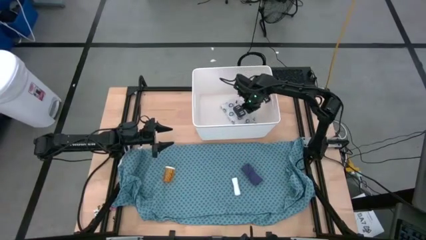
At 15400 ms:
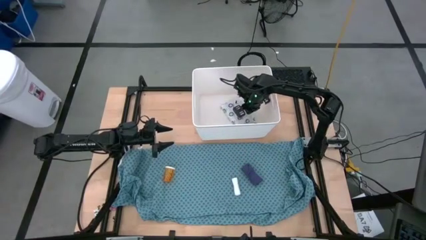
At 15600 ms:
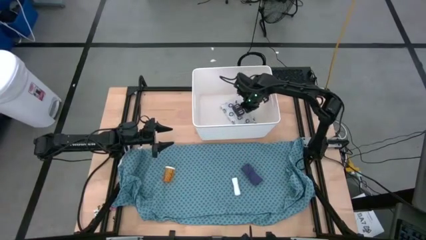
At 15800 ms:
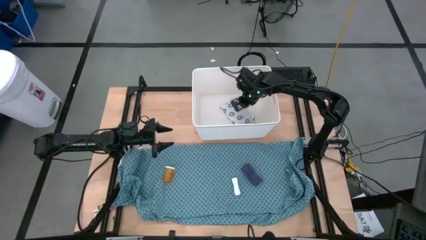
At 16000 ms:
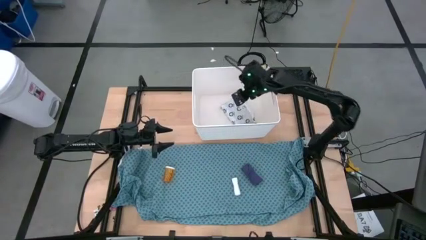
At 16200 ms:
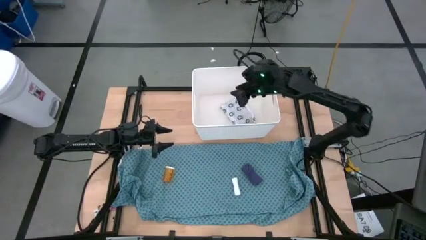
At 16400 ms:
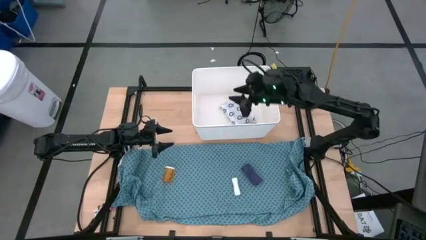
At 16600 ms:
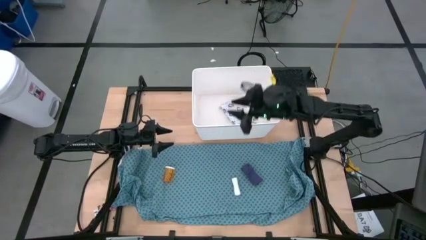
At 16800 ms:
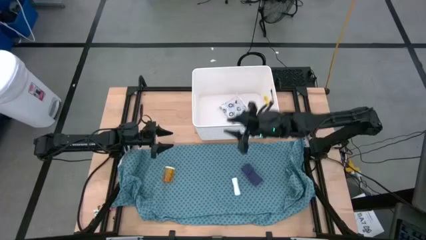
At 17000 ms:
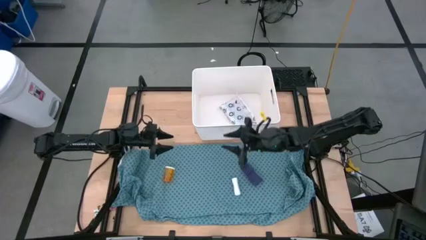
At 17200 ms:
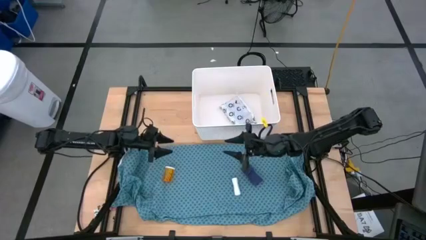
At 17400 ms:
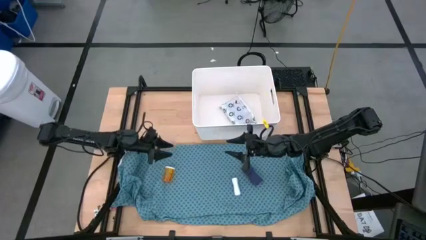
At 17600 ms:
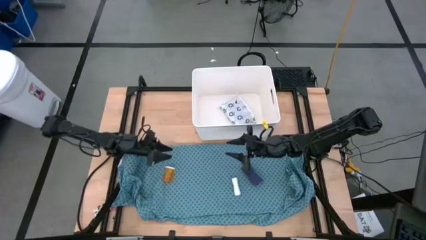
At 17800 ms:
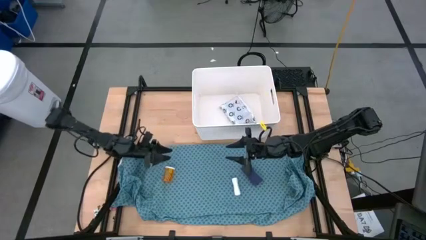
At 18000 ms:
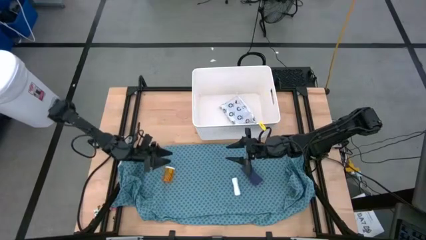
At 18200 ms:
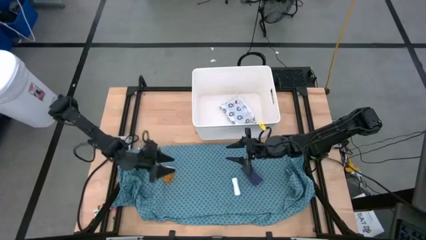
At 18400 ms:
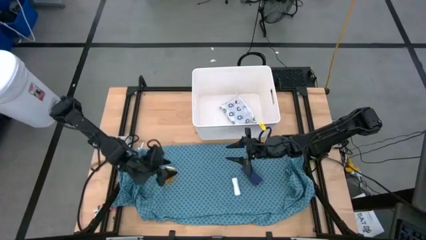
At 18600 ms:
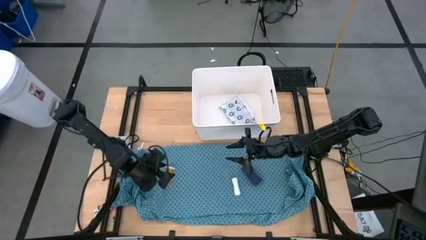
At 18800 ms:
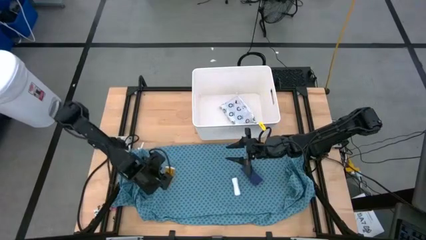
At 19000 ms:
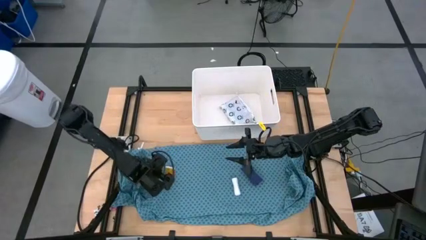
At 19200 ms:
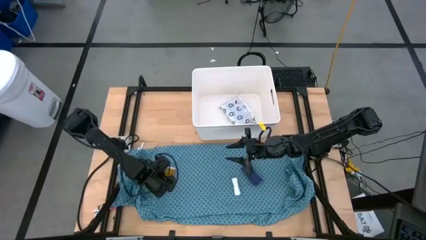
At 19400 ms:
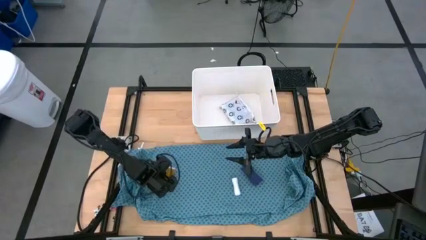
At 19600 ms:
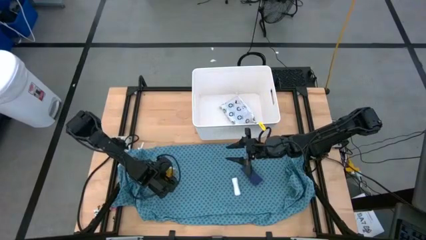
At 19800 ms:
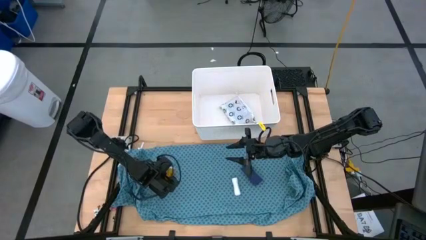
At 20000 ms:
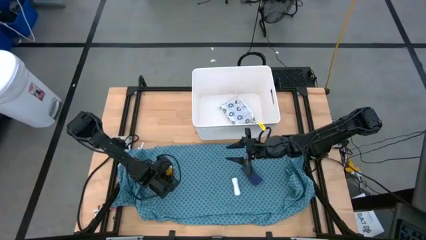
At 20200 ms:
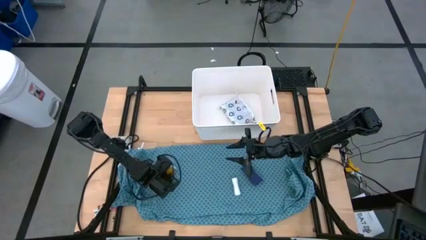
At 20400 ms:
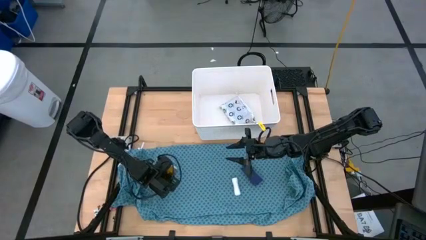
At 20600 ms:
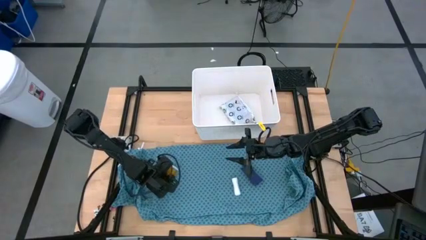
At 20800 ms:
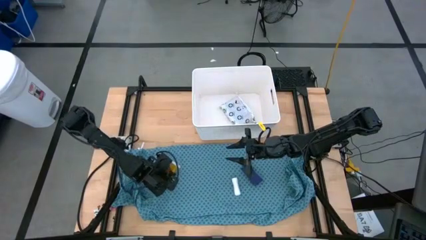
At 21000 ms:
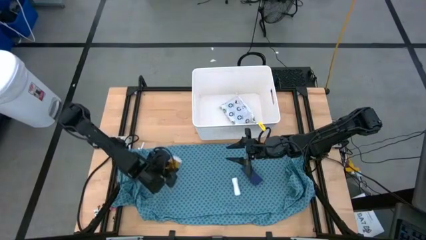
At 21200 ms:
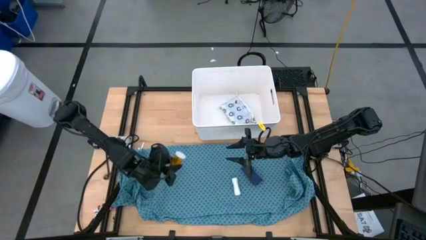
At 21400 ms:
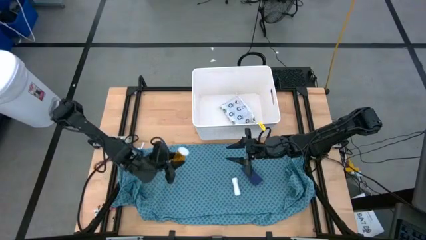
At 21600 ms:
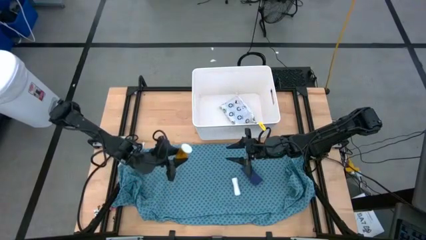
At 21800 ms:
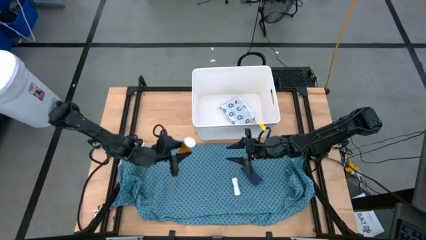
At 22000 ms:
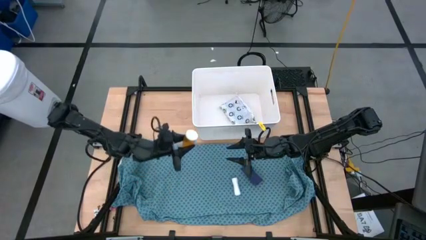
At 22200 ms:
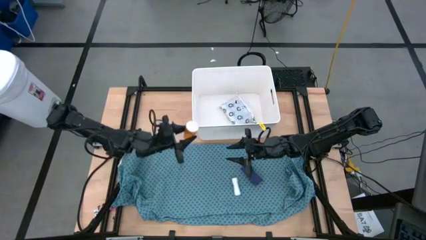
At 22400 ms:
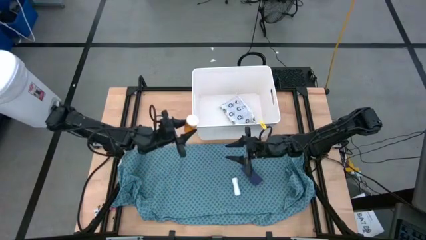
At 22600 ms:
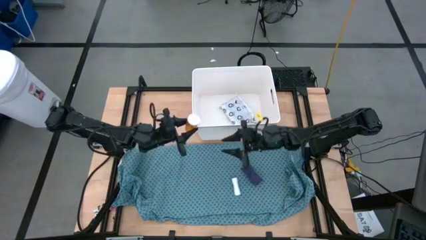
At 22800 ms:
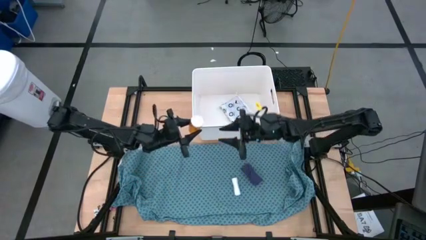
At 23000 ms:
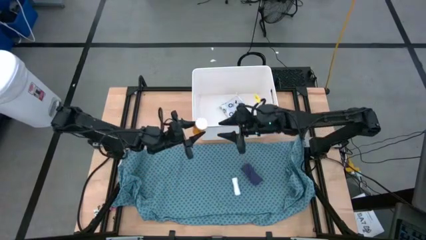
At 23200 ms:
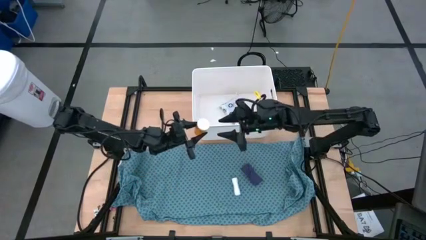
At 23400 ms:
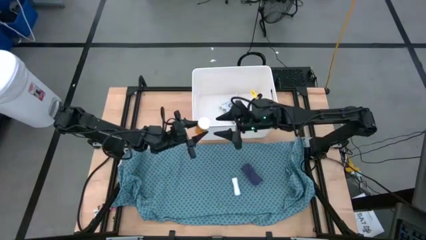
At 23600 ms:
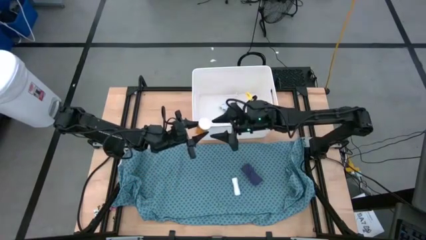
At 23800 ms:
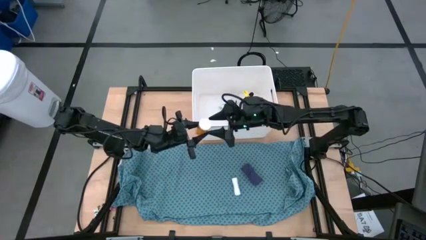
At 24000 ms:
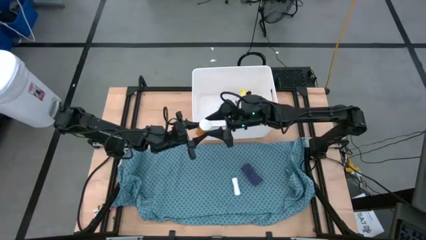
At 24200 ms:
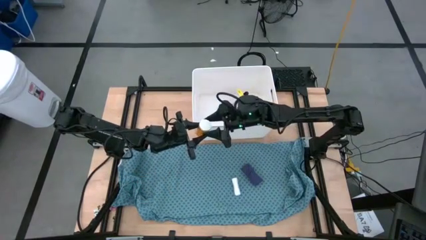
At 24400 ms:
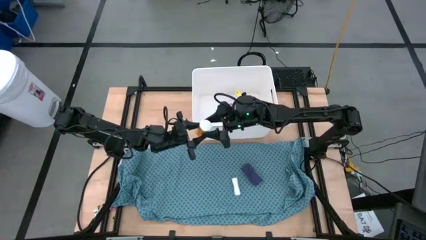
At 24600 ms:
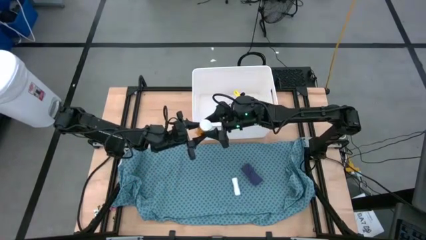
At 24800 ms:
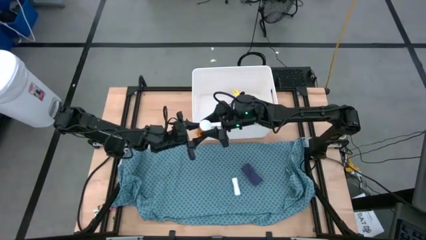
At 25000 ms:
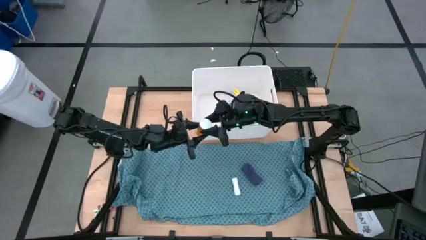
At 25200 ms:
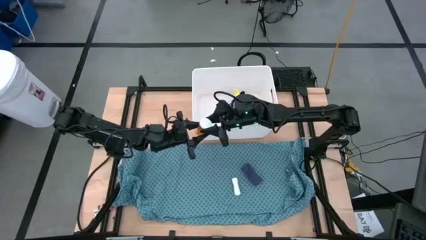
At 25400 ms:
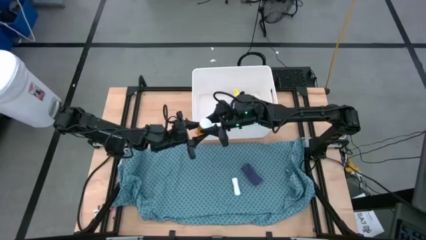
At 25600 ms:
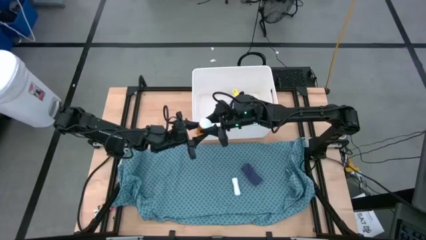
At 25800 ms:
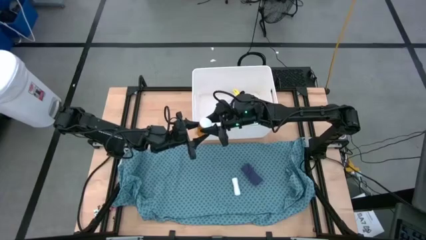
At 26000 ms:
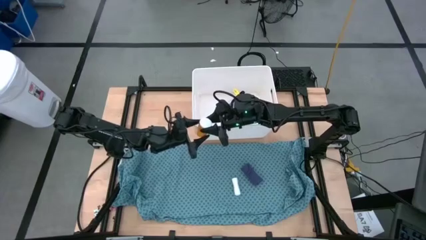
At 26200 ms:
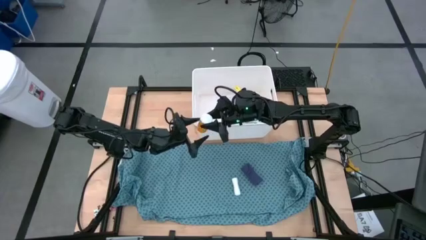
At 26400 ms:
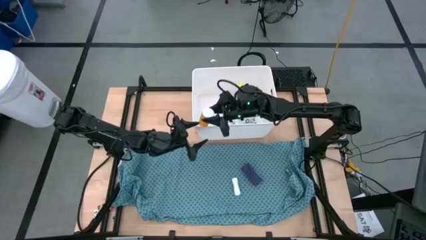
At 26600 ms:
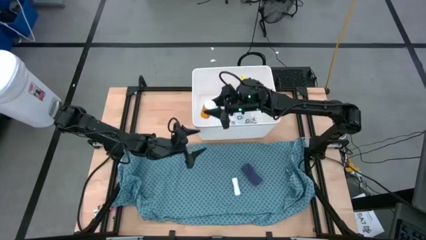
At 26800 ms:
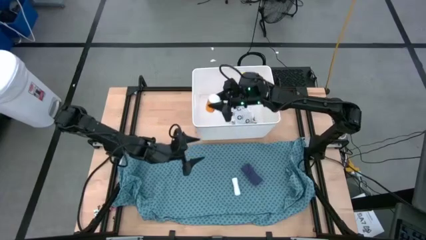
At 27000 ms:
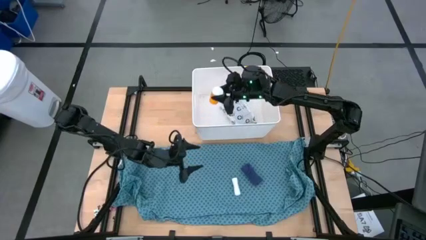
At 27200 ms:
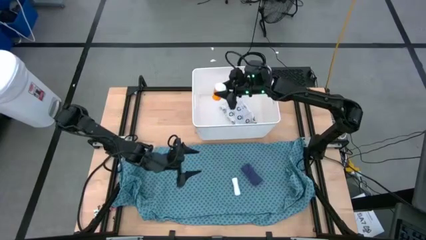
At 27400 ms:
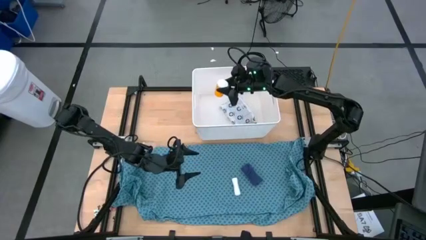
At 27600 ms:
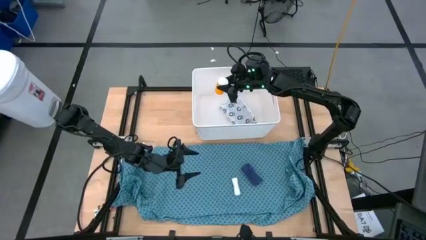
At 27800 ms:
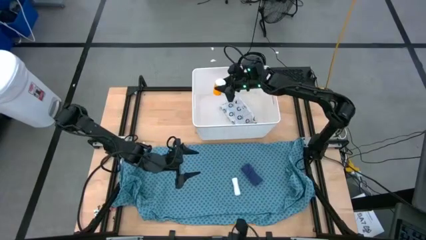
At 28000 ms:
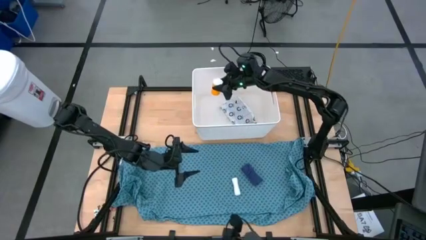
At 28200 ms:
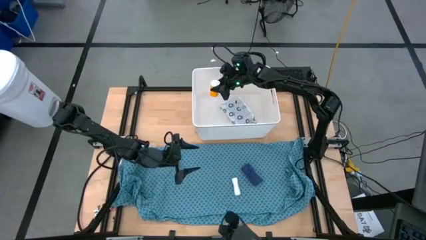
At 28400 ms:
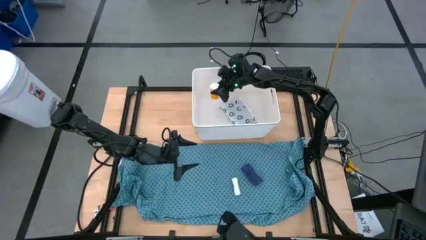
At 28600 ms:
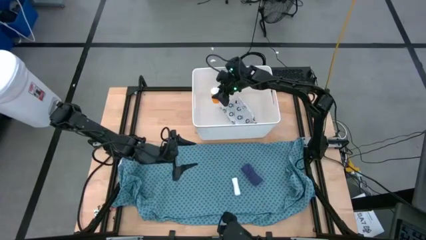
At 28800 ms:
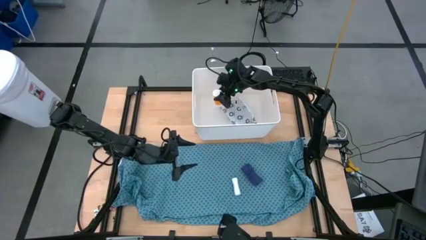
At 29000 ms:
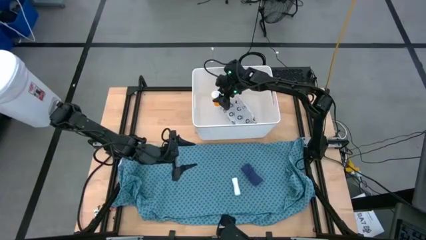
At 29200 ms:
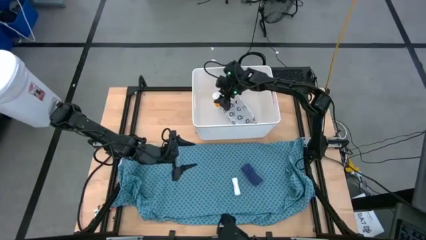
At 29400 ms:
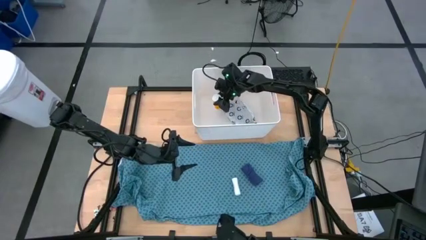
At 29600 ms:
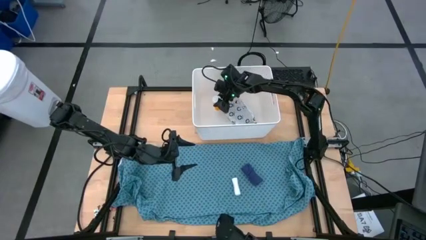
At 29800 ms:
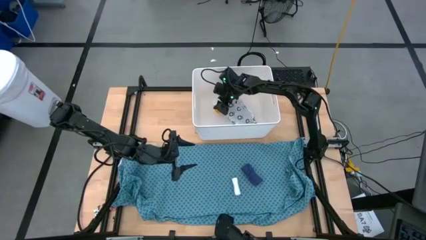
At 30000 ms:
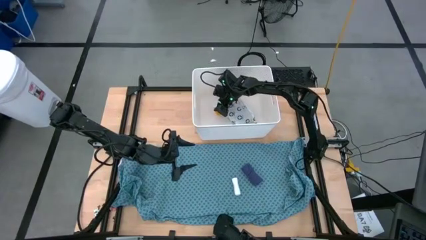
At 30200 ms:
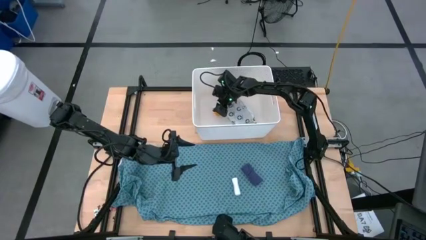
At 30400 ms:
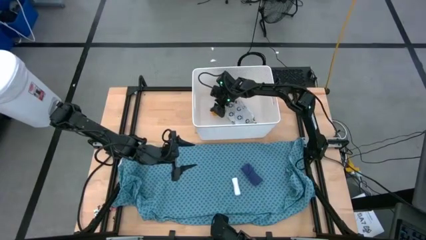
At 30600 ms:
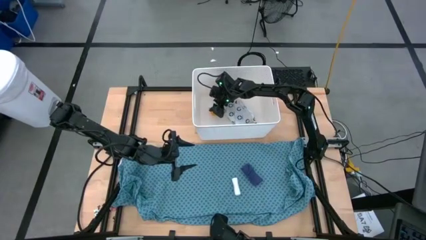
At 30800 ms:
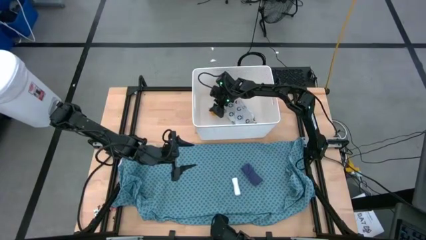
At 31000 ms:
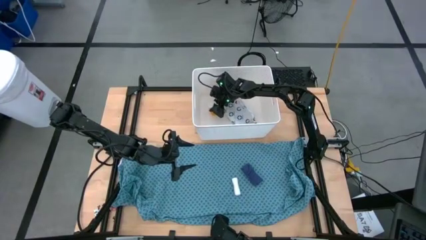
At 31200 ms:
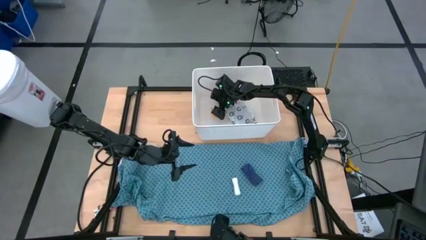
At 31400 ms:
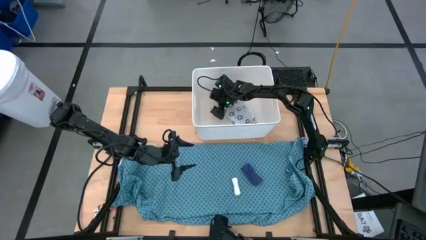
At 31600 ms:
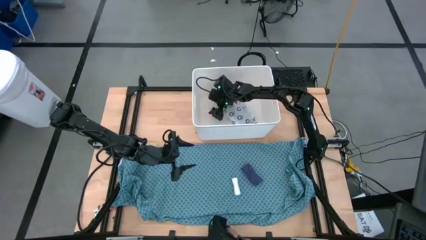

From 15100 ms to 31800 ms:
Task: Pick & place medical supplies in basket/bin
Put the orange pill bottle into the white bin
